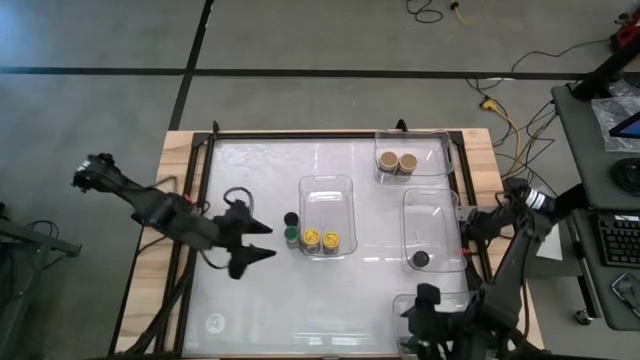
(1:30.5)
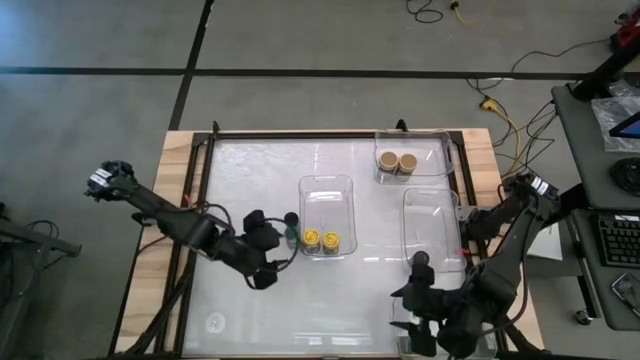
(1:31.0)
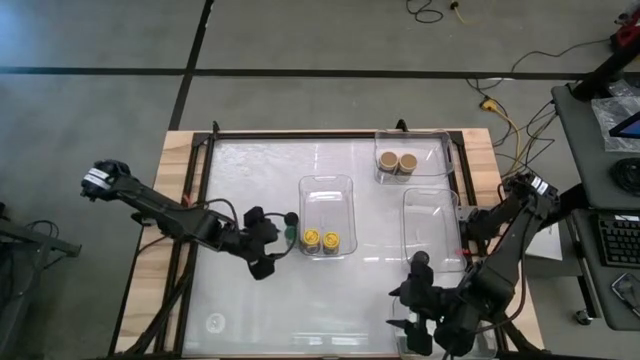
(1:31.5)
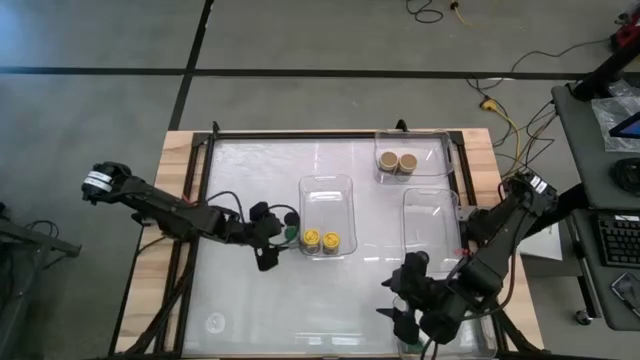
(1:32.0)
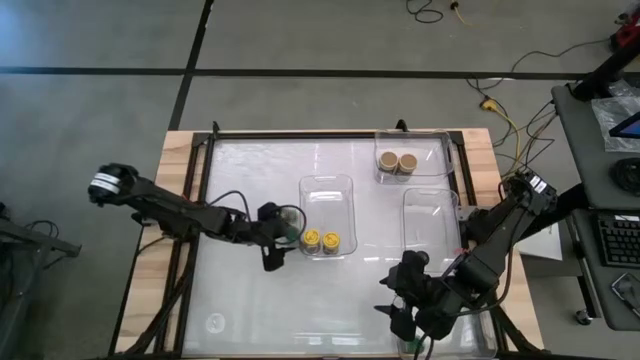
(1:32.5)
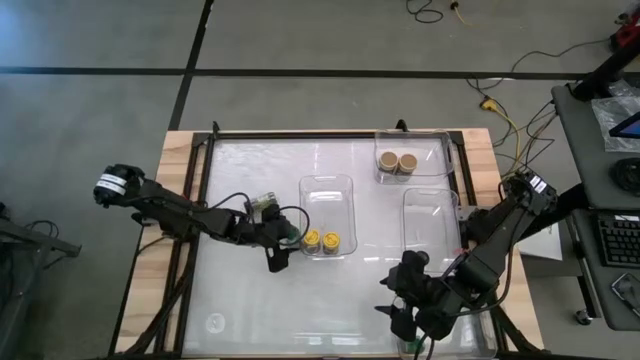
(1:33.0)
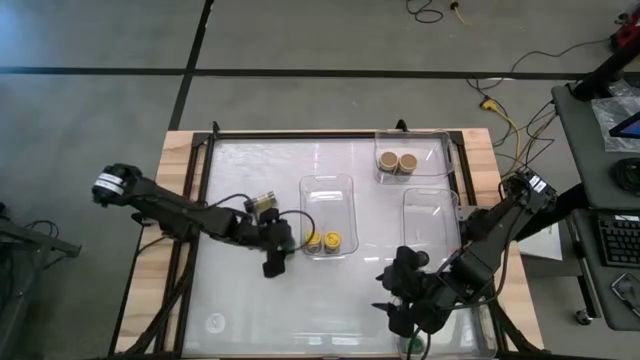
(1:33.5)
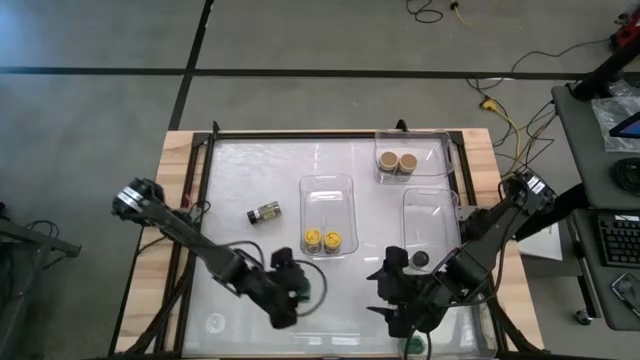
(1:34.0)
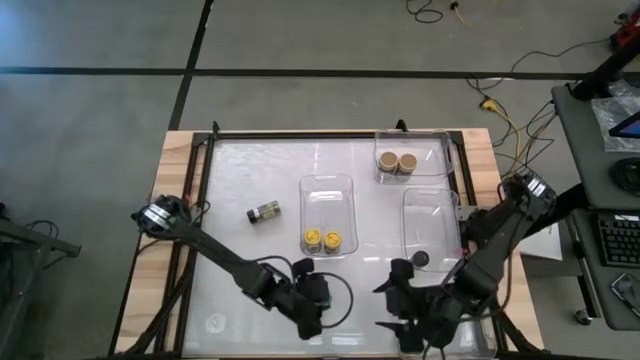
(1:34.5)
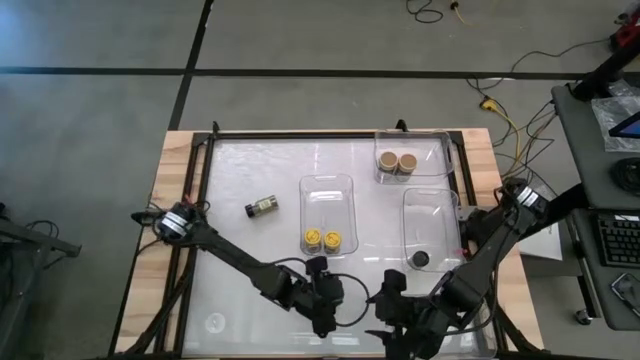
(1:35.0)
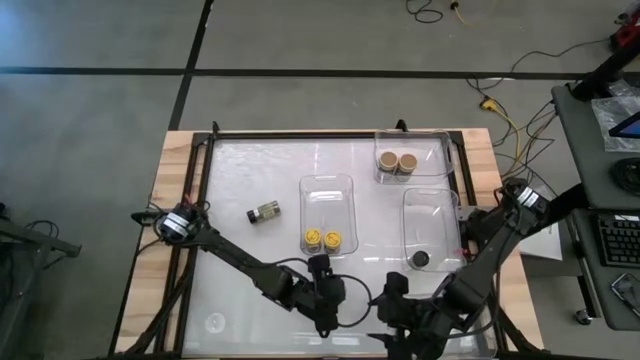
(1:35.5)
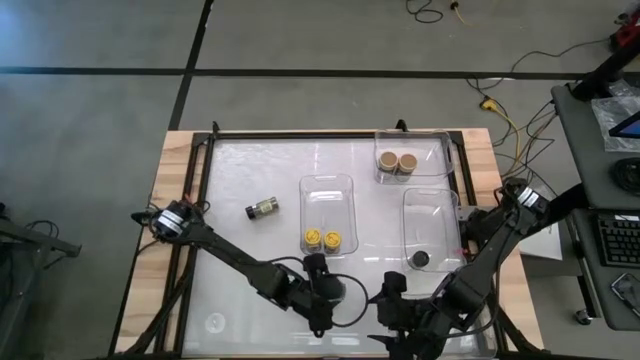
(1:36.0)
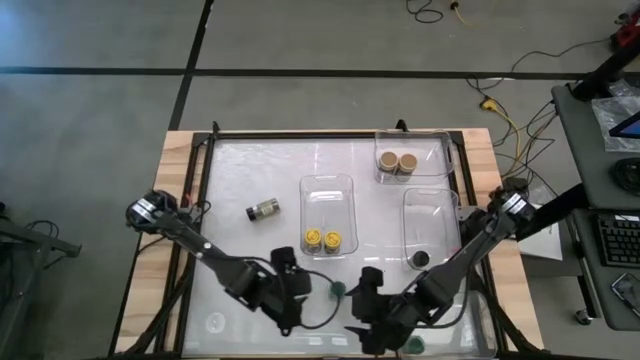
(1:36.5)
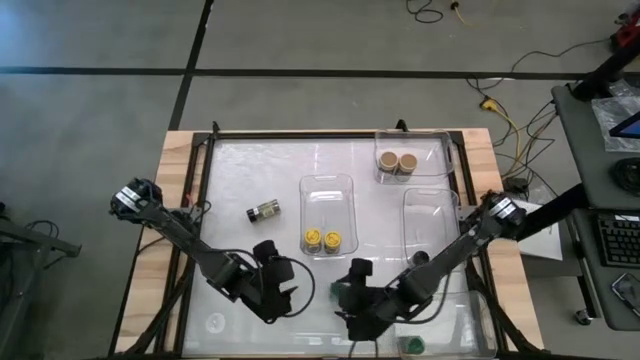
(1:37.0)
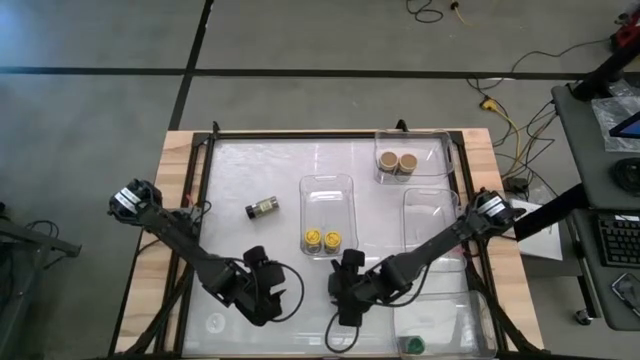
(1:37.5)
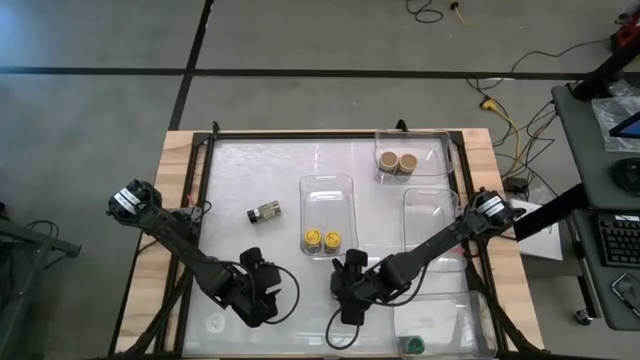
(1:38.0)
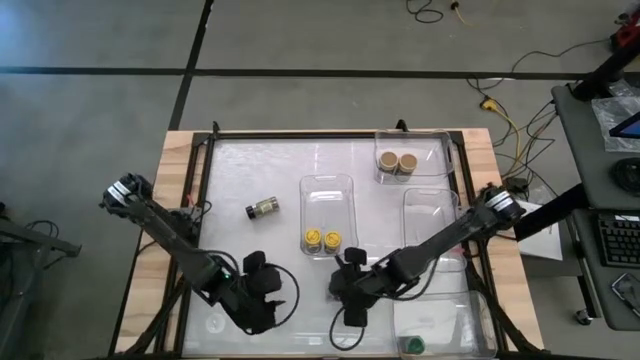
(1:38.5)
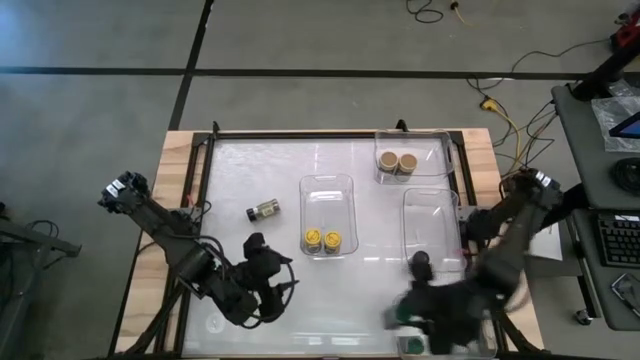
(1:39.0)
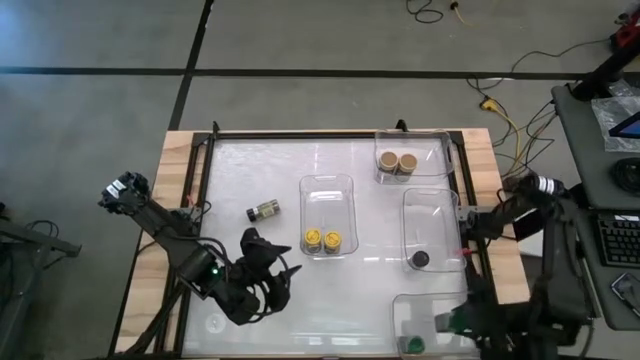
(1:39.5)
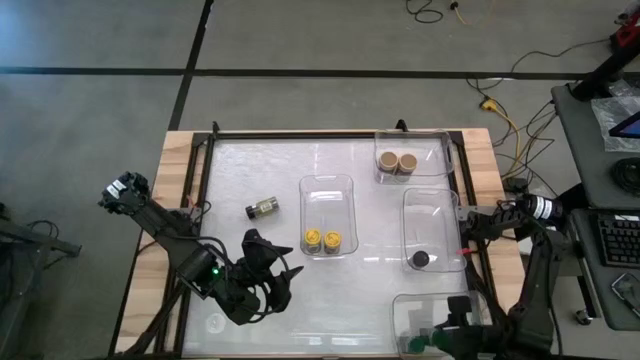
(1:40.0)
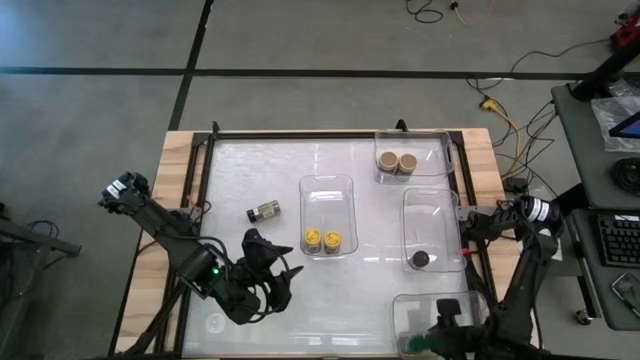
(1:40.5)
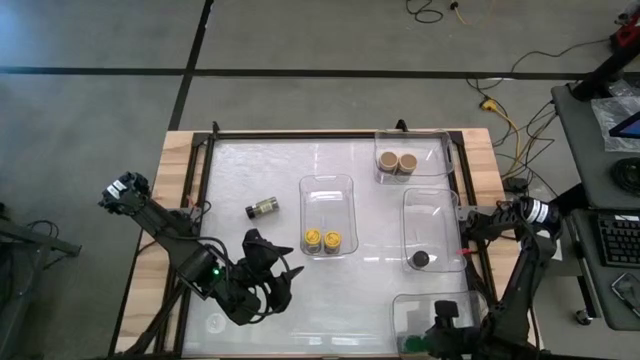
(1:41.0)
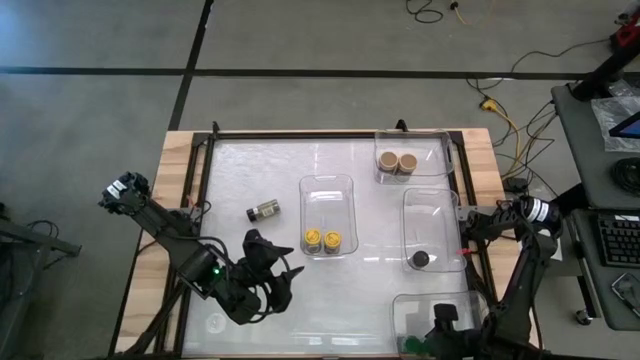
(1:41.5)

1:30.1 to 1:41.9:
Task: Sort spices by type
Put the green seasoning bottle into the bottom transparent bin

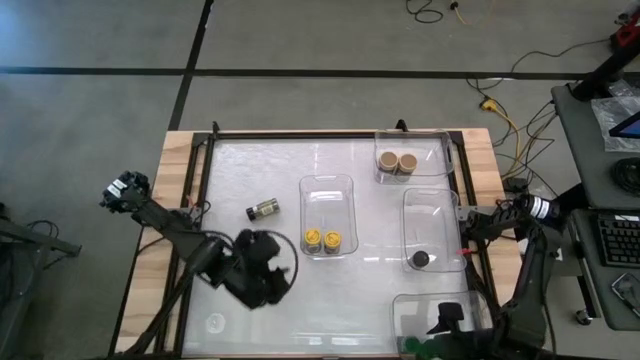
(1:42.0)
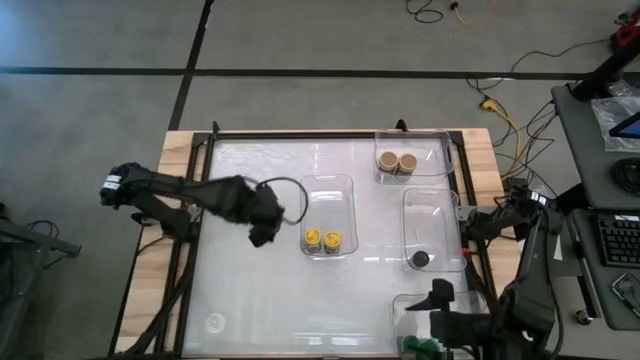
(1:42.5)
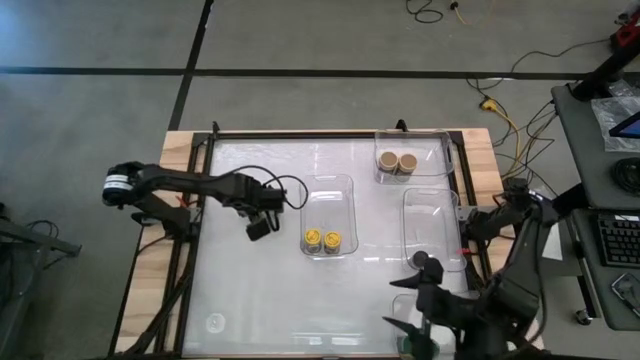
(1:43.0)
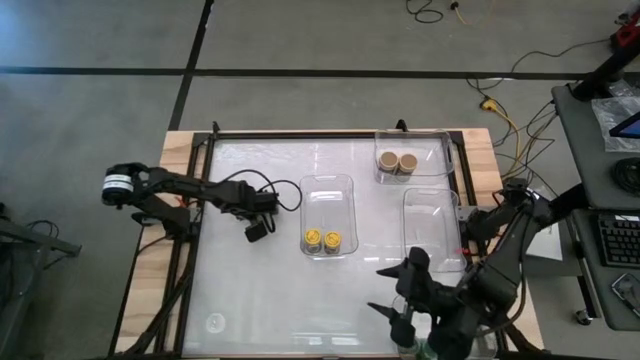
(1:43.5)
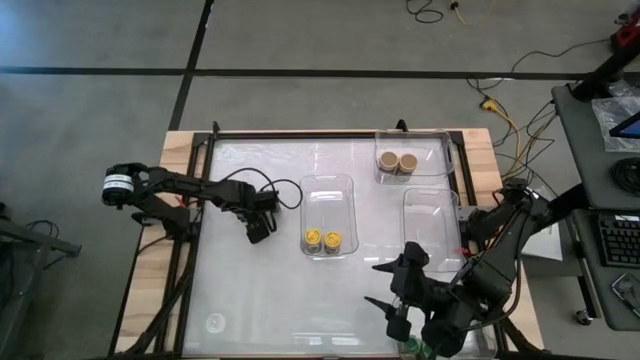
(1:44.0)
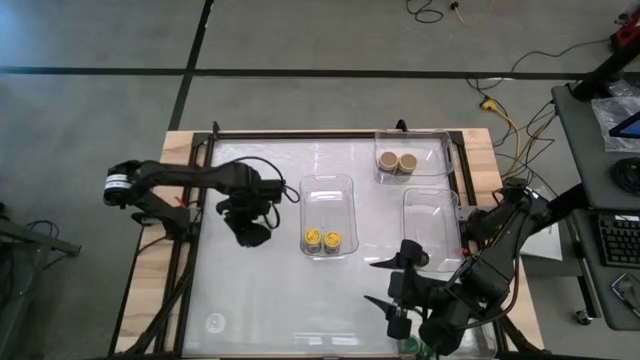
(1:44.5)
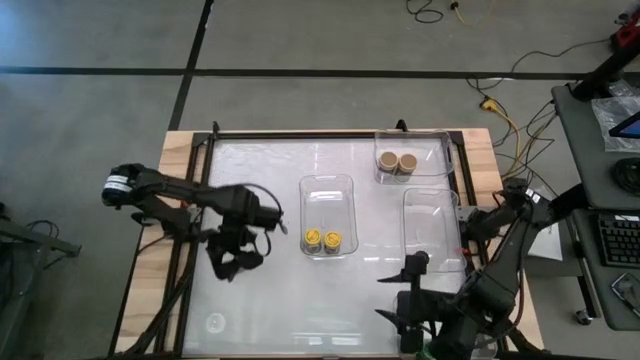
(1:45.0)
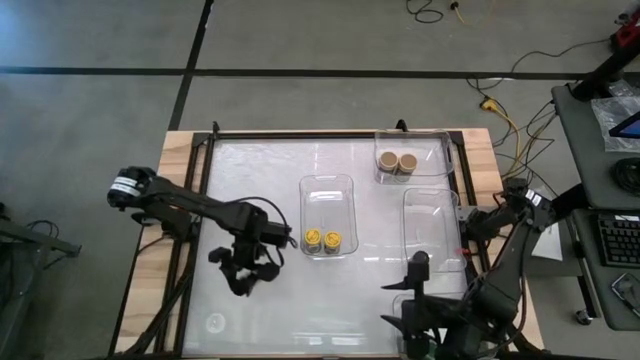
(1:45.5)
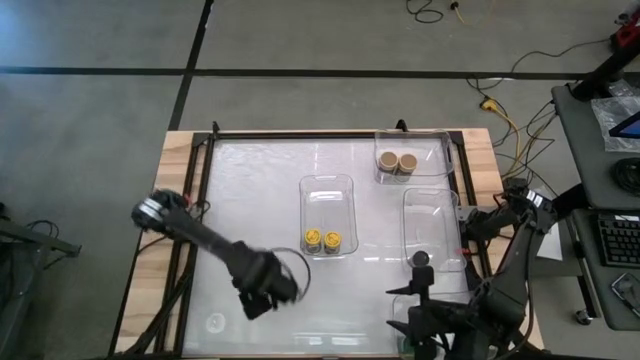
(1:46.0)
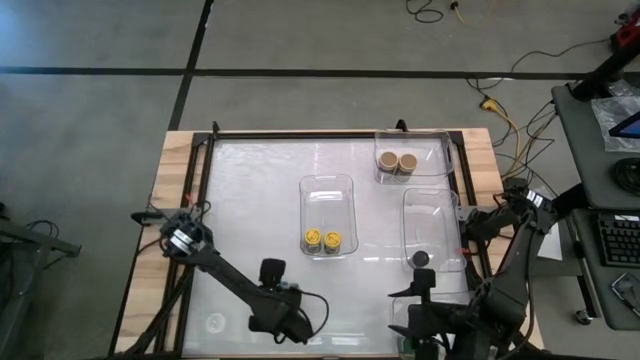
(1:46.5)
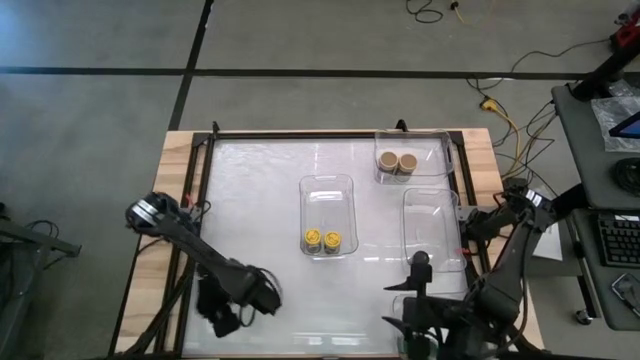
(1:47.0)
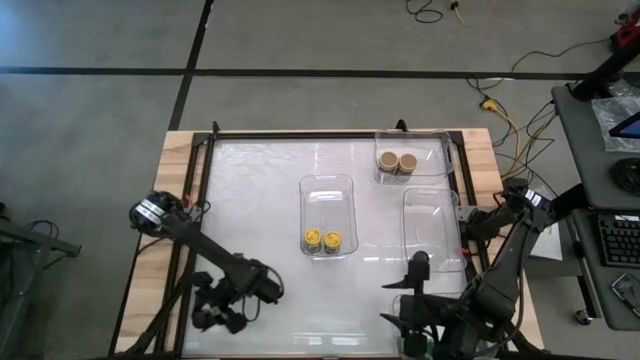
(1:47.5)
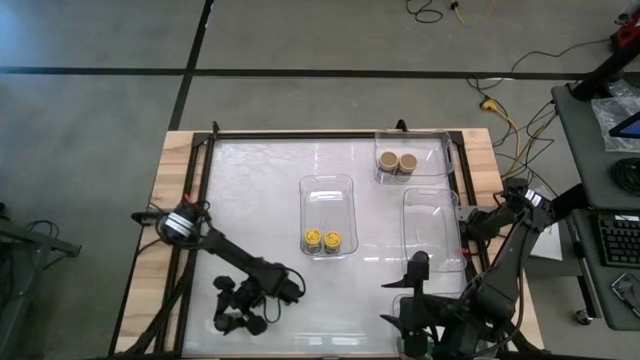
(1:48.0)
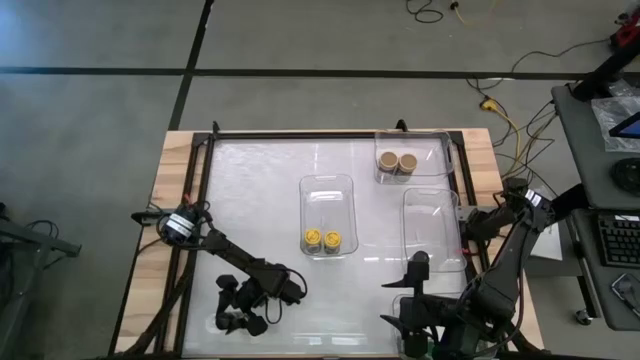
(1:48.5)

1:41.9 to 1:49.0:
Put the black seasoning bottle into the middle right transparent bin
